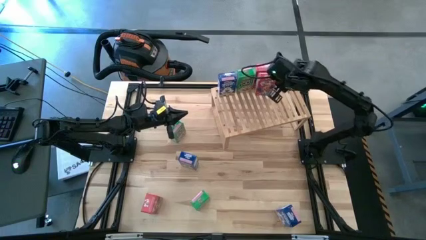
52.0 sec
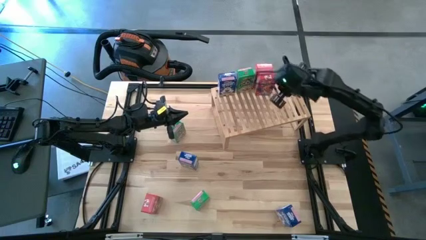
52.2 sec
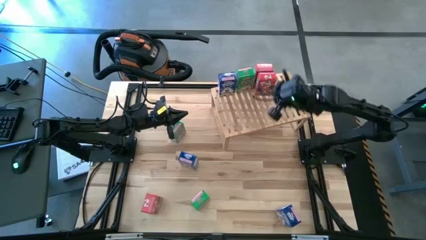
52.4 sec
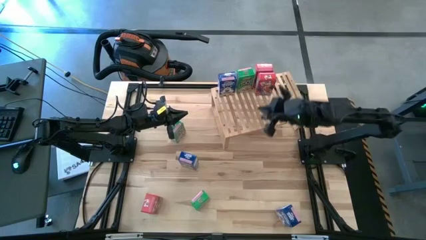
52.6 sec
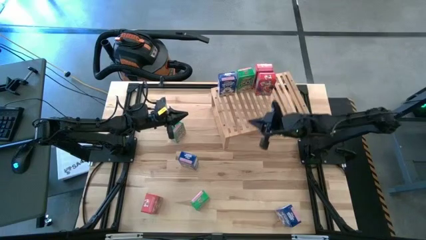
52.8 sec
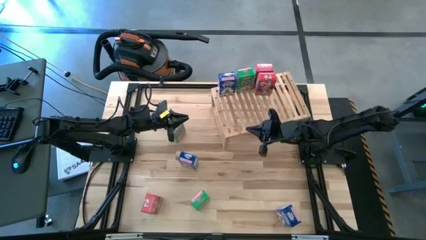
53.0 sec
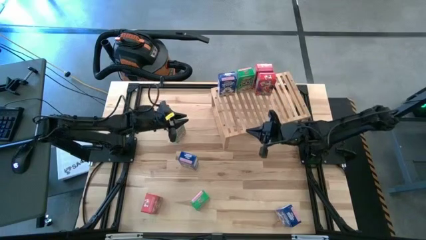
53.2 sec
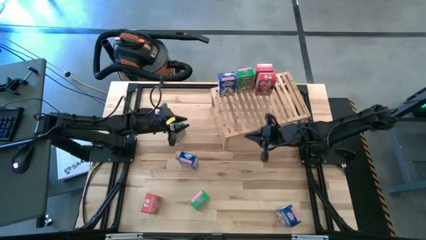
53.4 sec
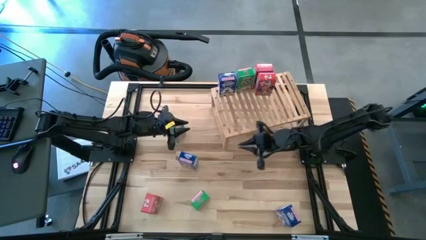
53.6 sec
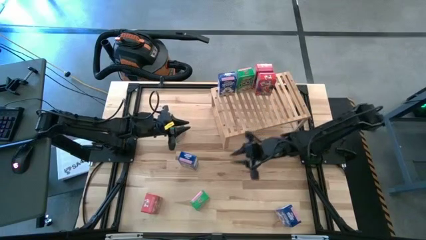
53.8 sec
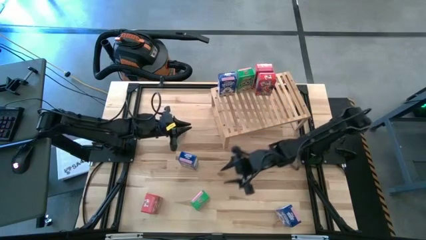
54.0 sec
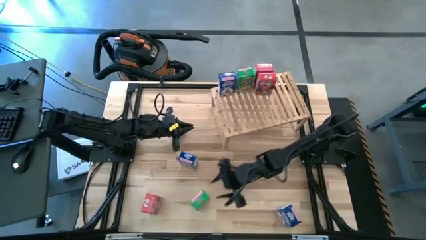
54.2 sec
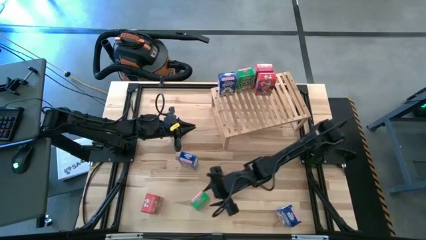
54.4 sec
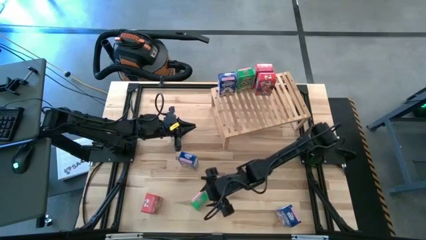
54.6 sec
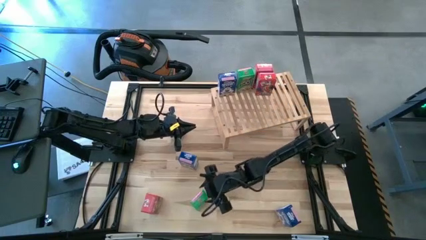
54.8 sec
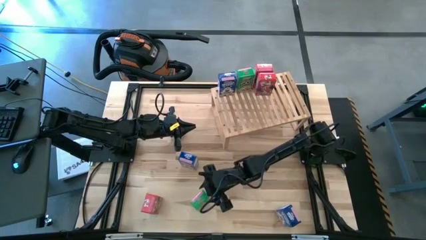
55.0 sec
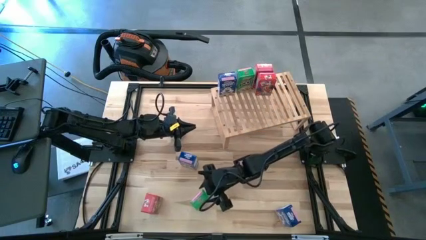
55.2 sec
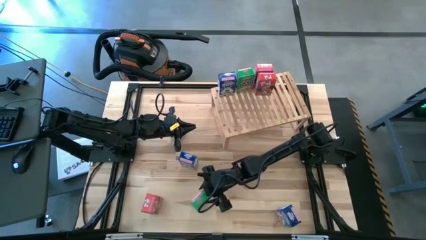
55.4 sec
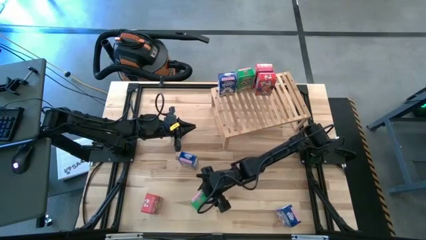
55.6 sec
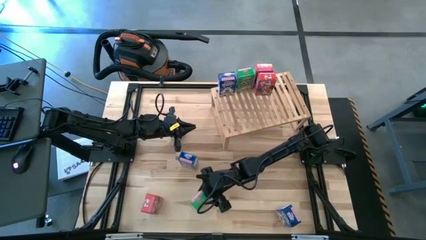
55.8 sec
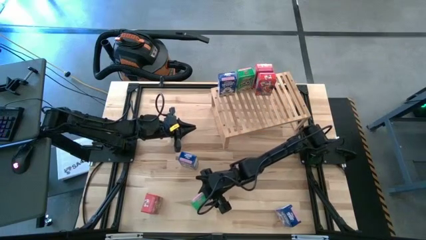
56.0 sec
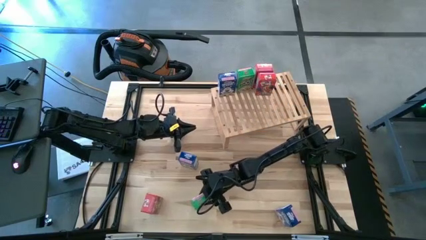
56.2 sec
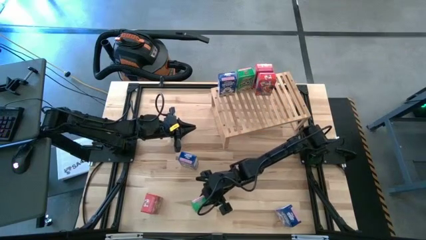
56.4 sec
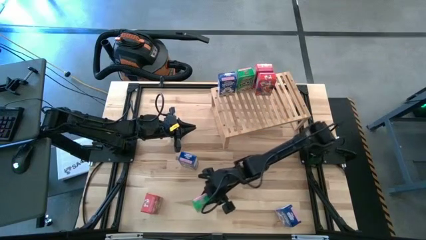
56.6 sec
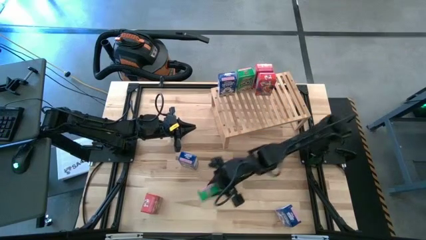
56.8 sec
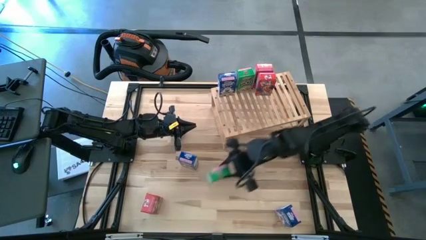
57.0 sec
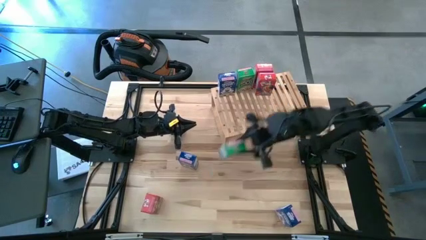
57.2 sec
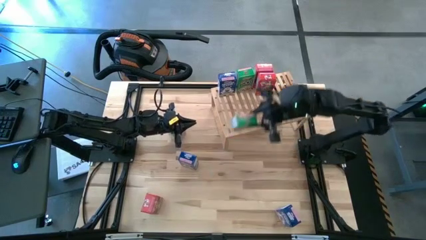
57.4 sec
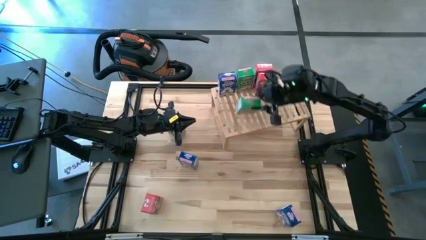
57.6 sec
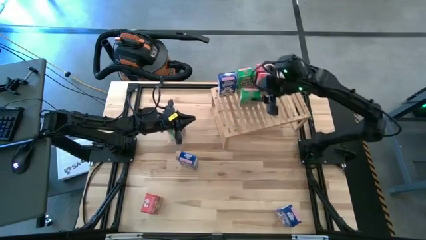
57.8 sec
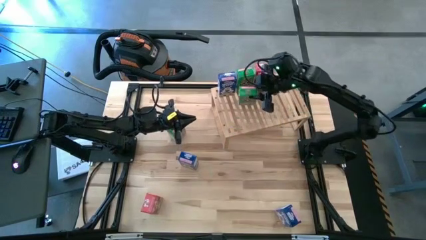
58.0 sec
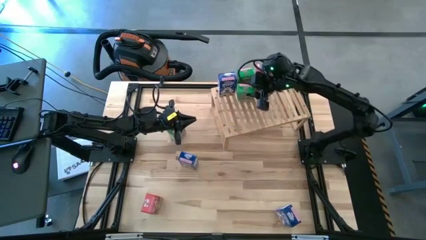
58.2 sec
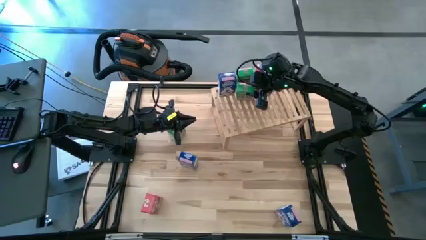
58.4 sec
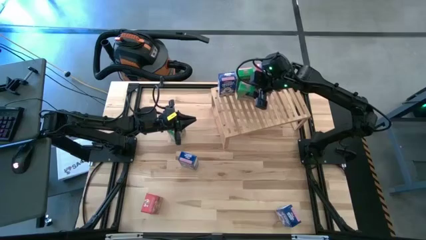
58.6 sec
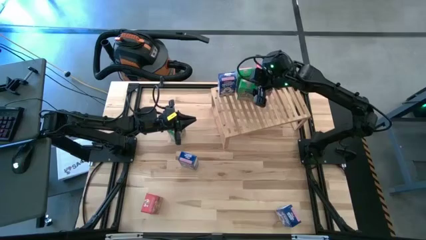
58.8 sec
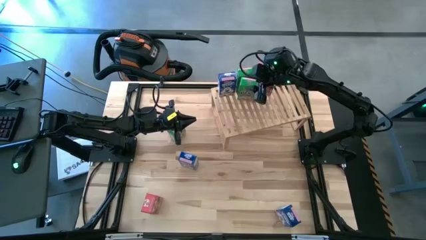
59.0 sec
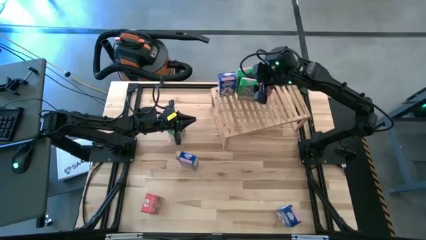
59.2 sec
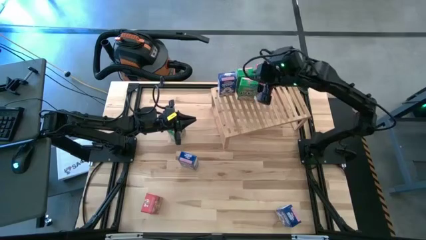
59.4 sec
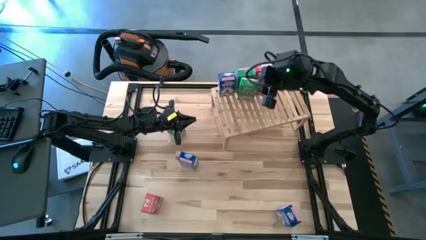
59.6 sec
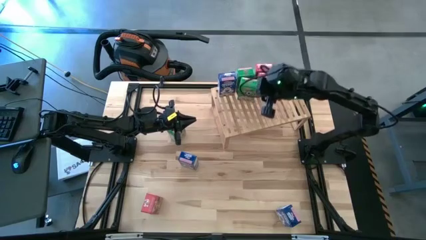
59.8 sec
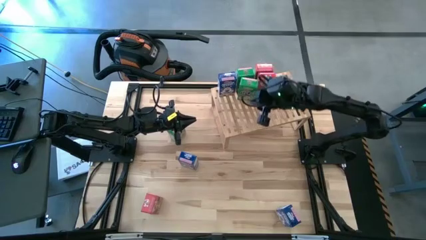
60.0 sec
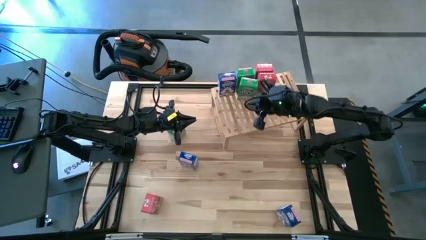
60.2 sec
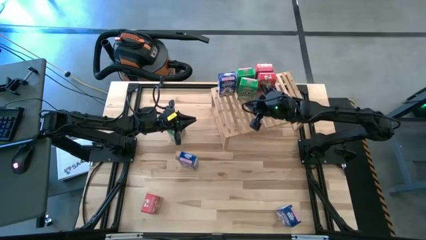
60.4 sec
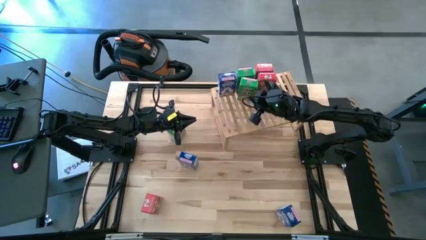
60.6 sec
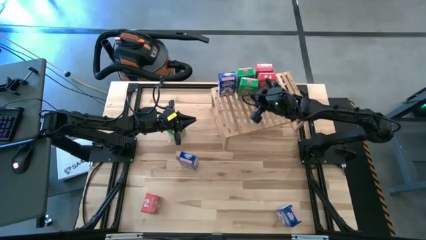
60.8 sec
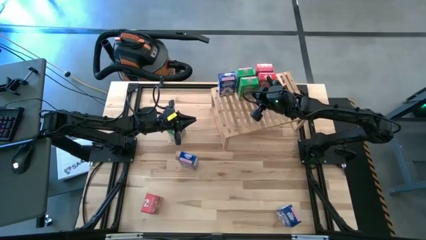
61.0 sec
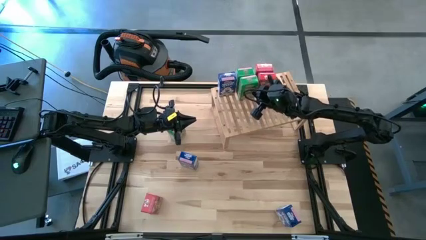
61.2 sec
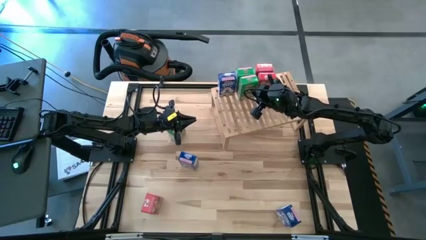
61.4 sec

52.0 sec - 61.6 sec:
Task: Stack cereal on shelf
Put the bottom green cereal box on the shelf aligned with the other green cereal box

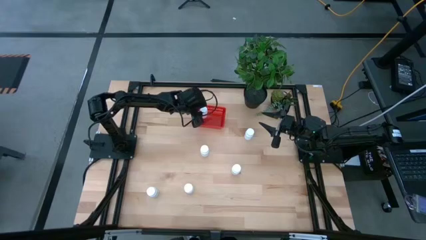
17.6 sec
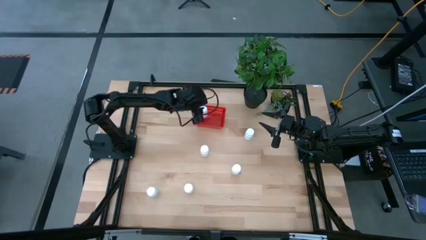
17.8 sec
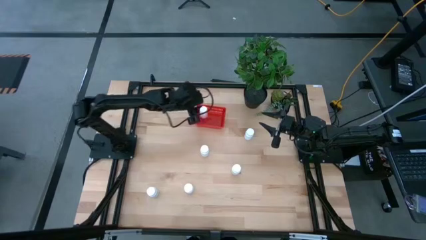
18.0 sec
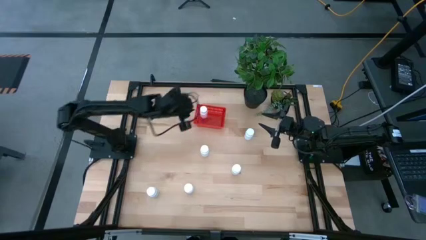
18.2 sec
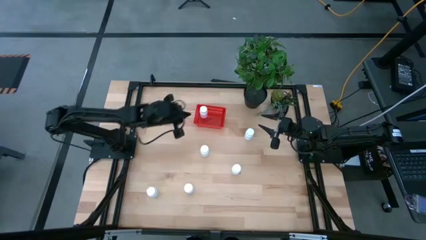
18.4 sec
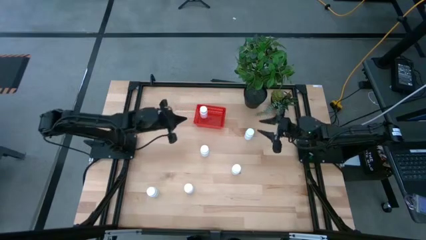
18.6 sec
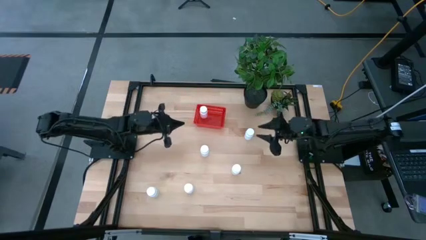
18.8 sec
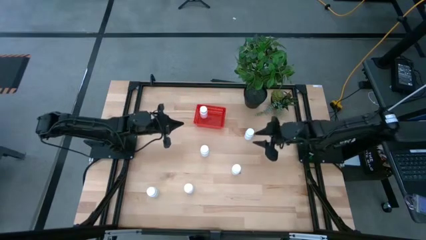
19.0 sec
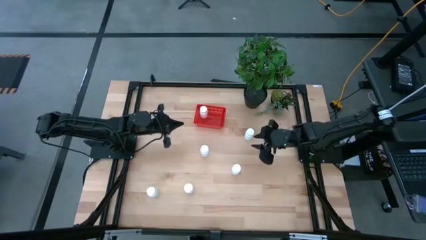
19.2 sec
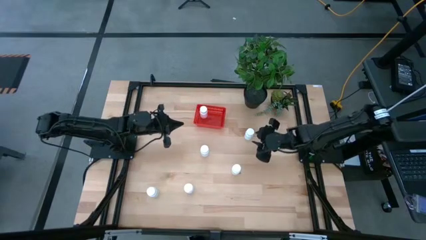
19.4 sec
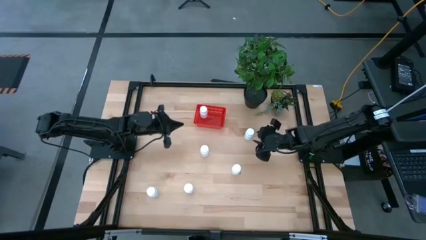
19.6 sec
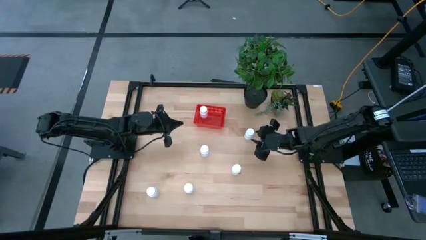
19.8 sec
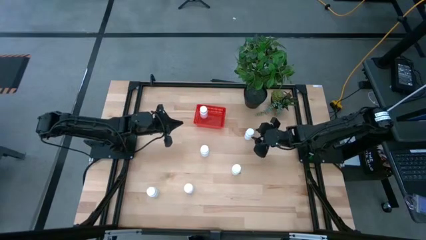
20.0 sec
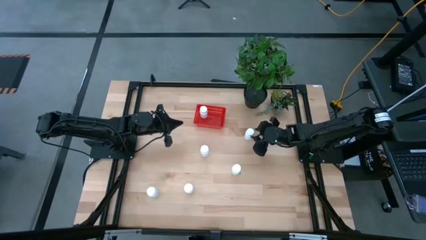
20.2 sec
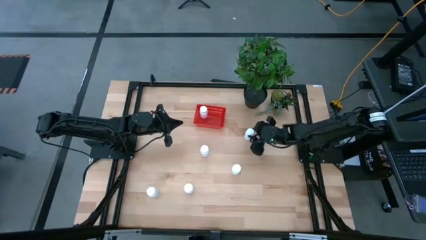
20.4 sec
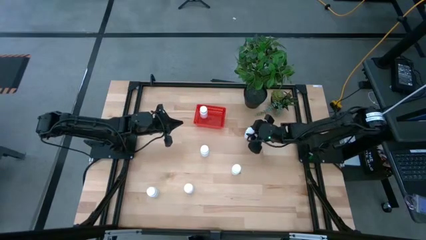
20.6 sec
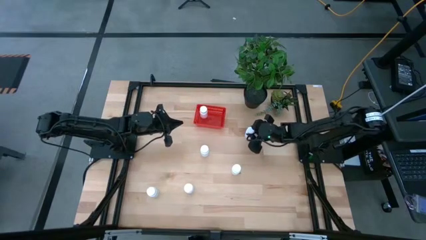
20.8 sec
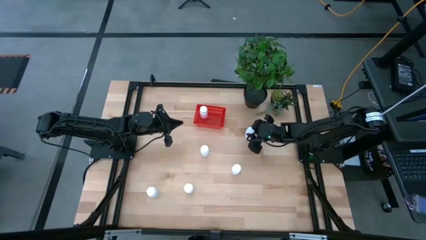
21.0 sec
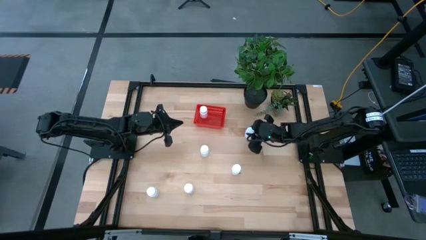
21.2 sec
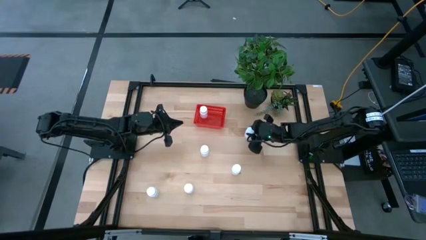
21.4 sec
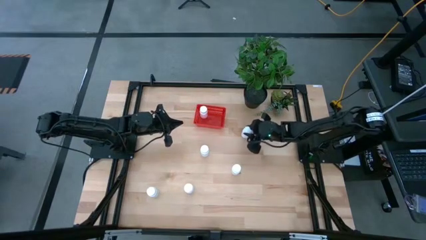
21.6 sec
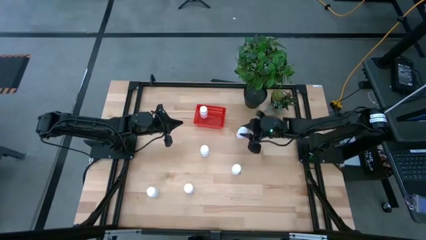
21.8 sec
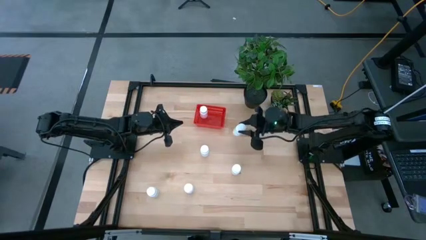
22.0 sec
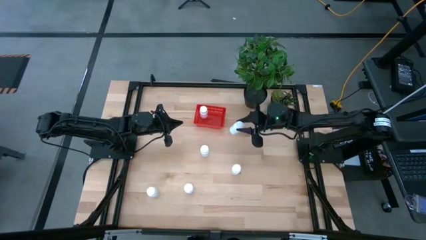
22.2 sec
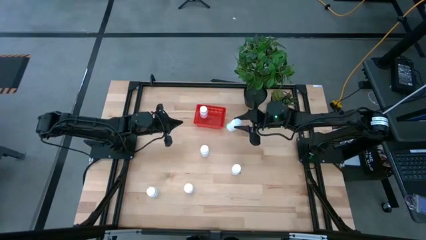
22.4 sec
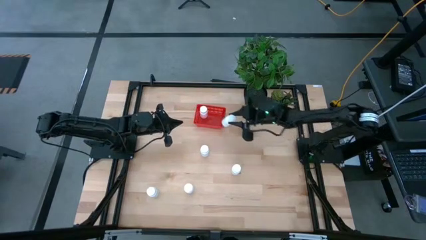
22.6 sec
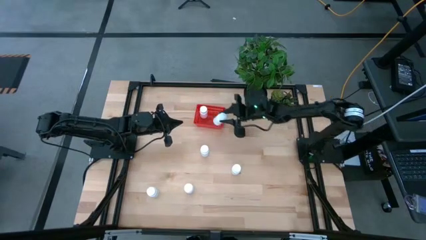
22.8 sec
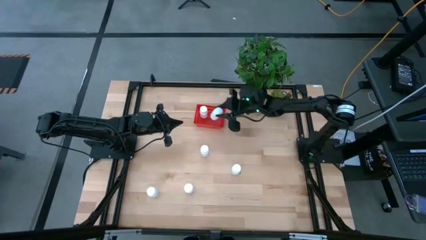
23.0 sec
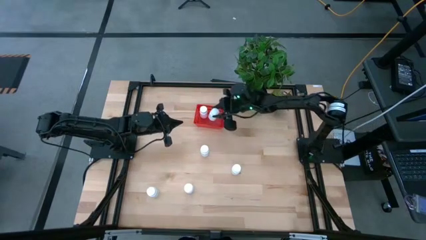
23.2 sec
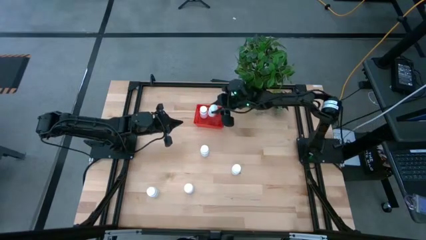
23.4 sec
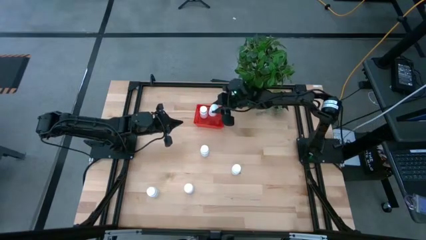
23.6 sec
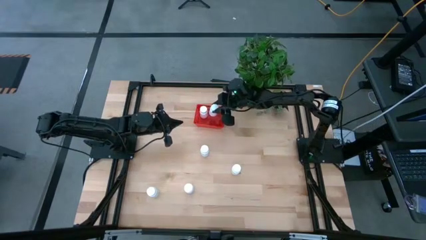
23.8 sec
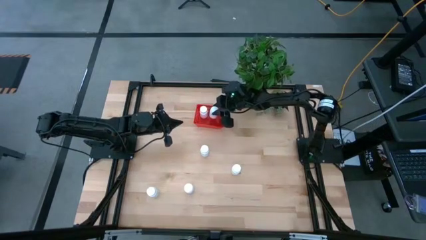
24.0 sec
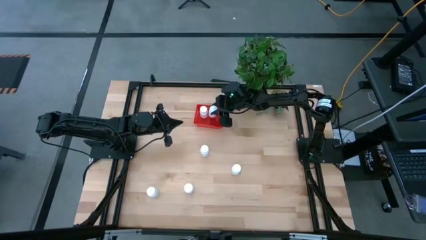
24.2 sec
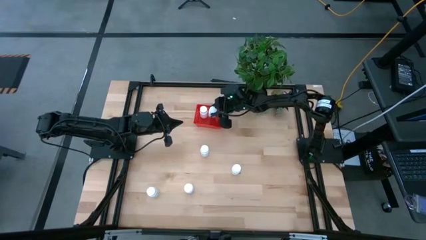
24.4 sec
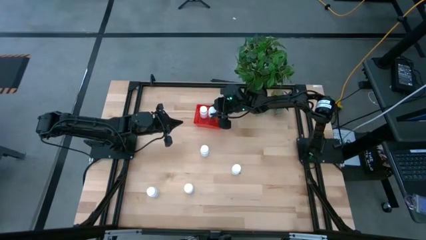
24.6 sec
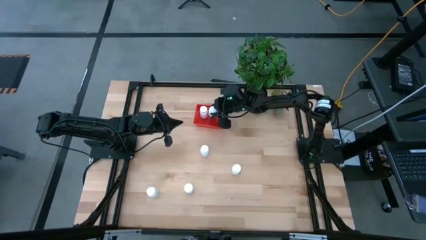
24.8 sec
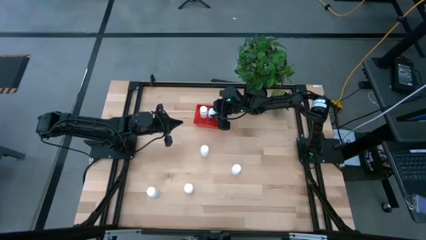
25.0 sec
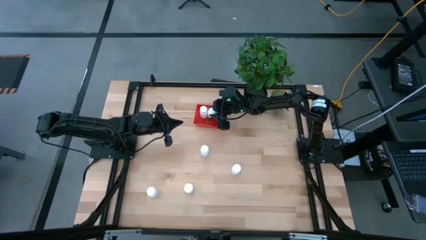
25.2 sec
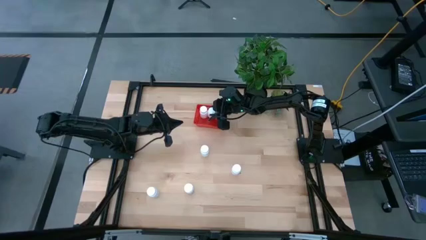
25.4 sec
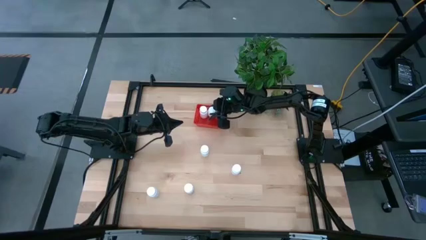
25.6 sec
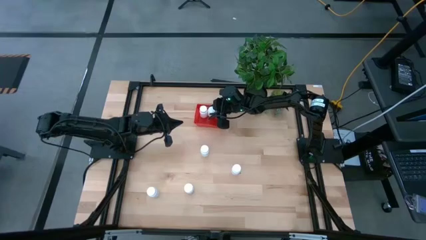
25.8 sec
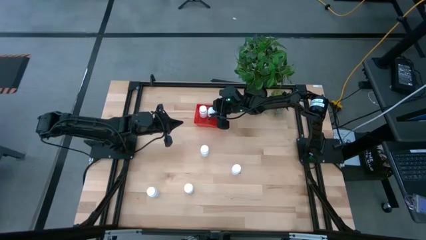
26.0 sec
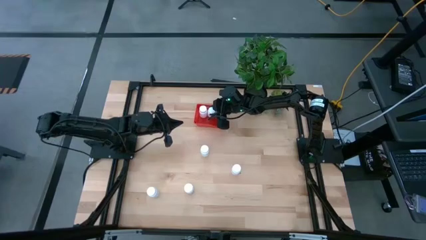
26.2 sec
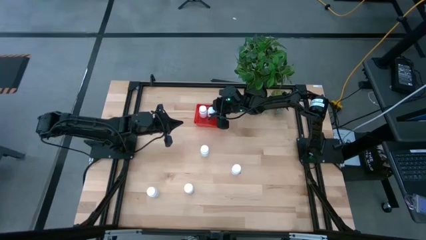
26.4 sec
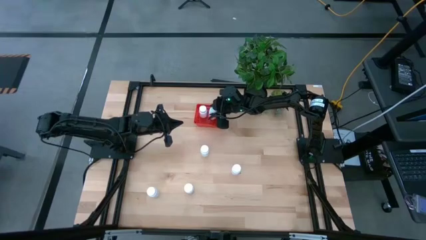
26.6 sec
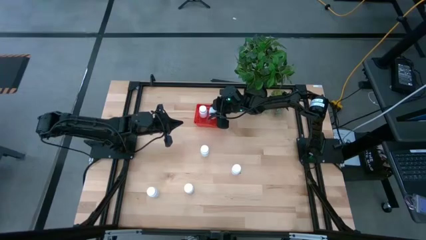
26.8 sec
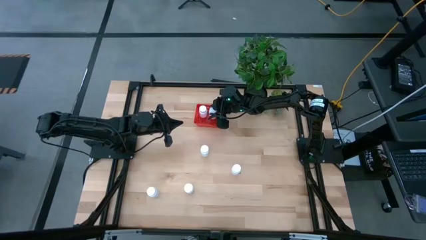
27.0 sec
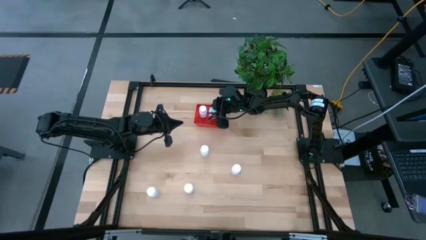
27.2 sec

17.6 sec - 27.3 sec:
Task: Pick and place pill bottles into a basket
Put the white pill bottle into the red bin
